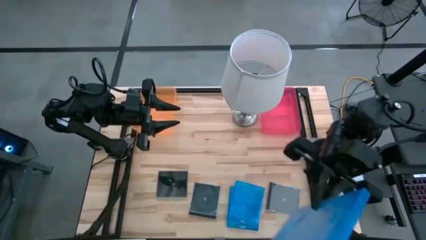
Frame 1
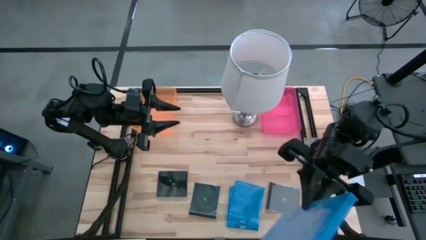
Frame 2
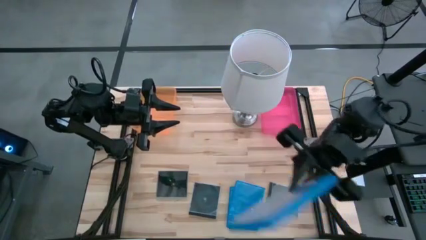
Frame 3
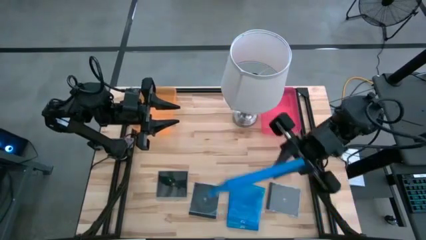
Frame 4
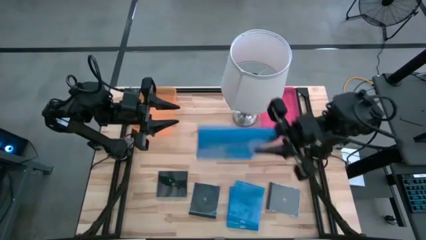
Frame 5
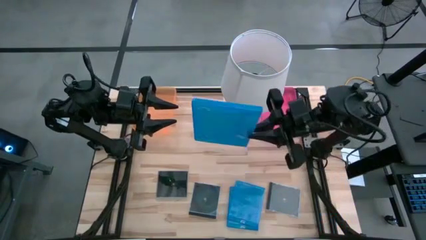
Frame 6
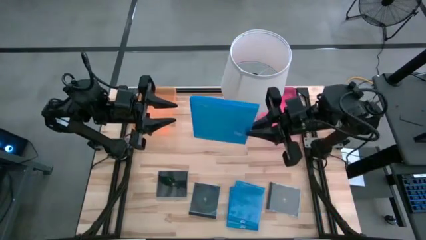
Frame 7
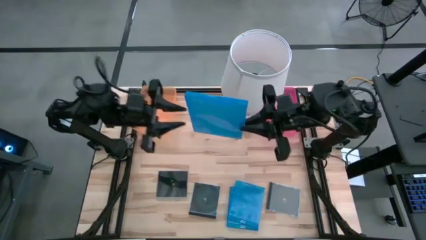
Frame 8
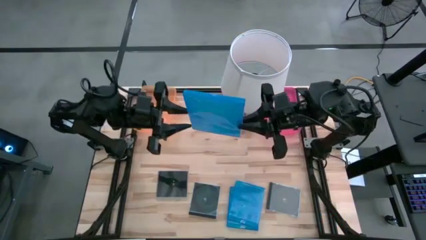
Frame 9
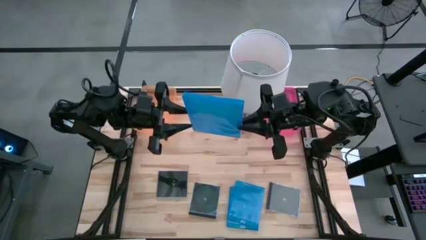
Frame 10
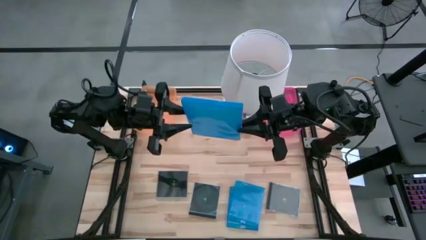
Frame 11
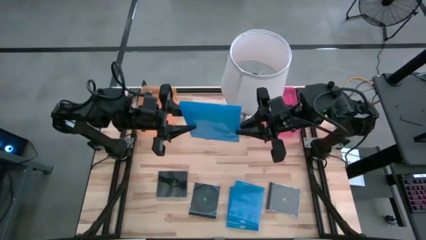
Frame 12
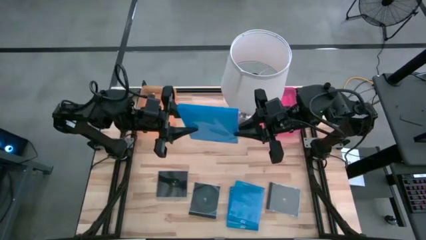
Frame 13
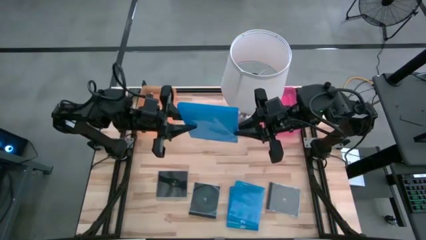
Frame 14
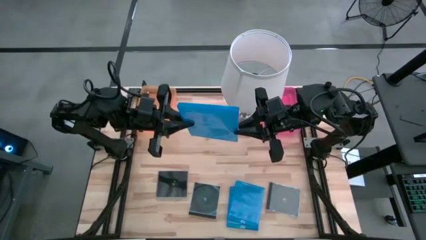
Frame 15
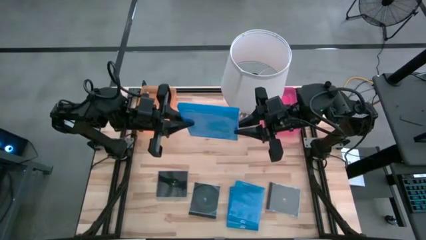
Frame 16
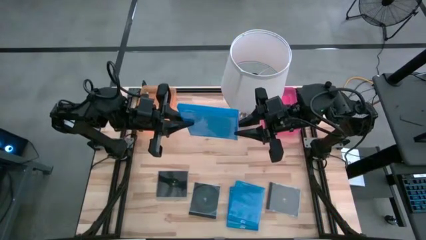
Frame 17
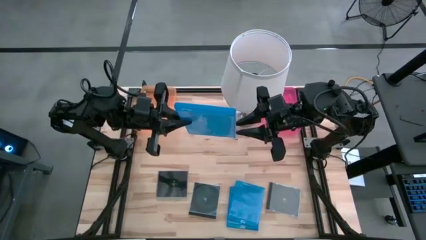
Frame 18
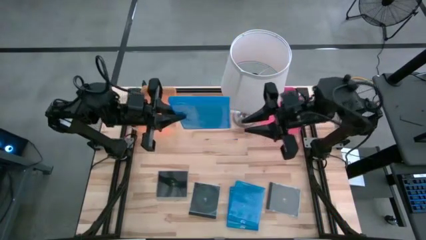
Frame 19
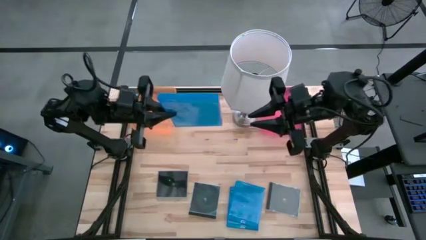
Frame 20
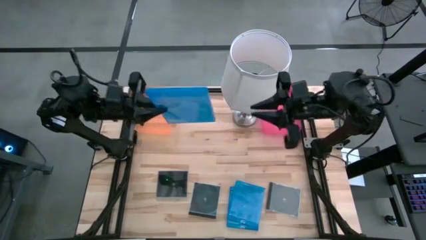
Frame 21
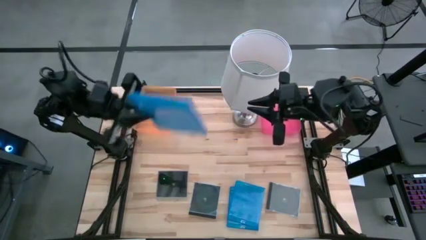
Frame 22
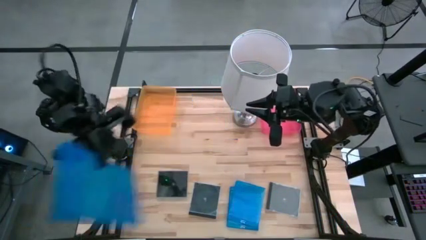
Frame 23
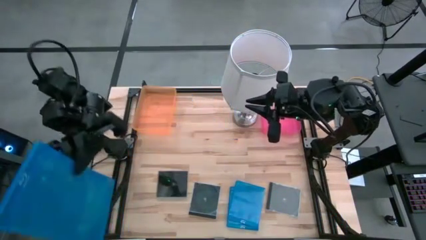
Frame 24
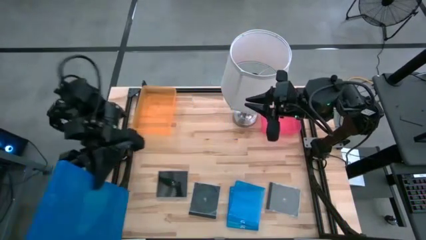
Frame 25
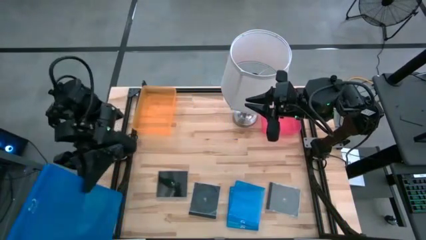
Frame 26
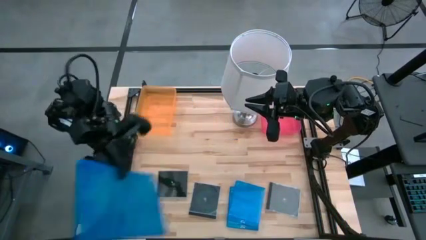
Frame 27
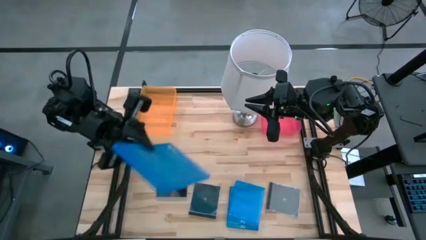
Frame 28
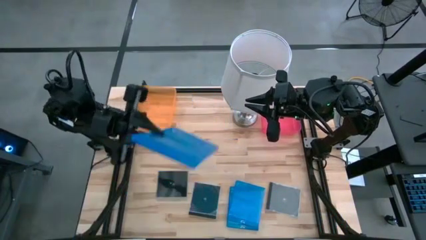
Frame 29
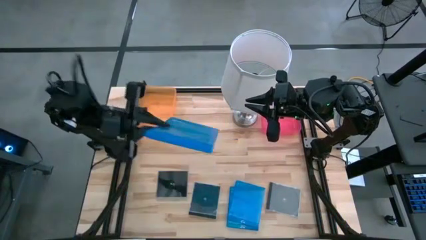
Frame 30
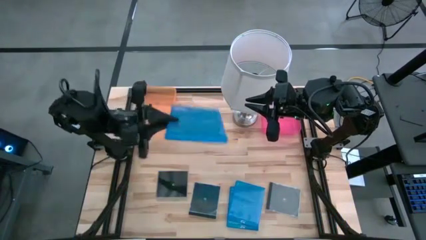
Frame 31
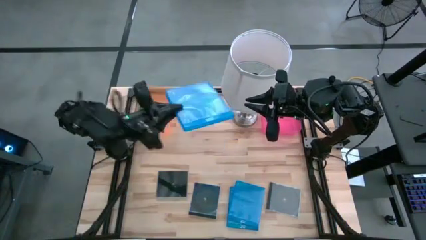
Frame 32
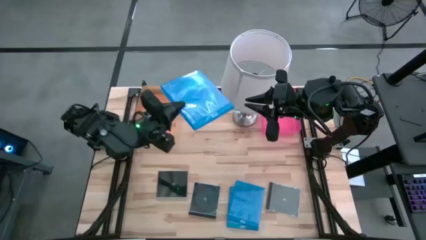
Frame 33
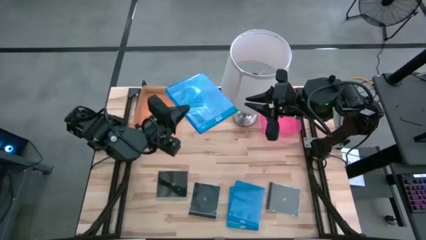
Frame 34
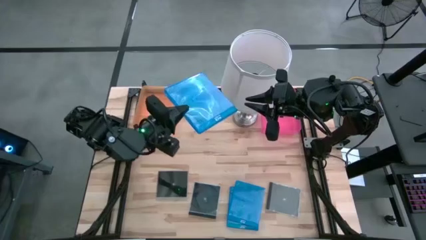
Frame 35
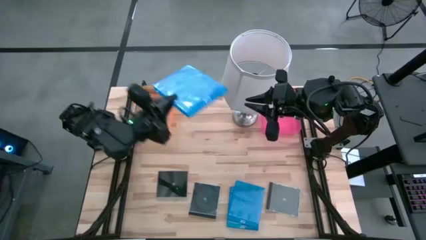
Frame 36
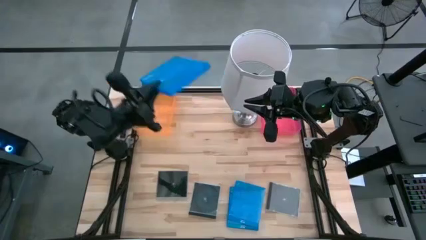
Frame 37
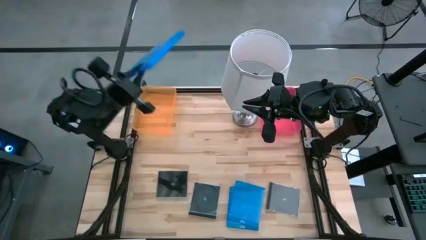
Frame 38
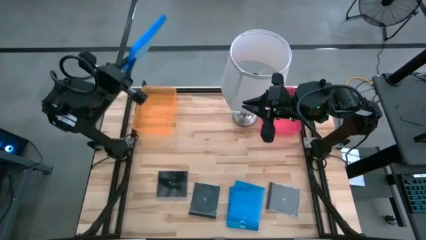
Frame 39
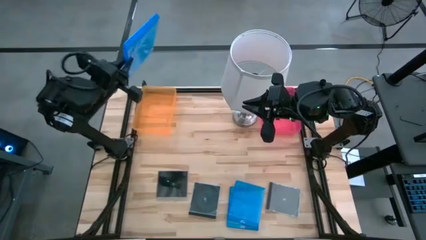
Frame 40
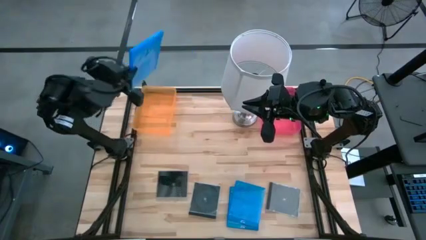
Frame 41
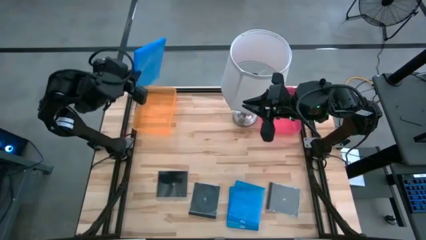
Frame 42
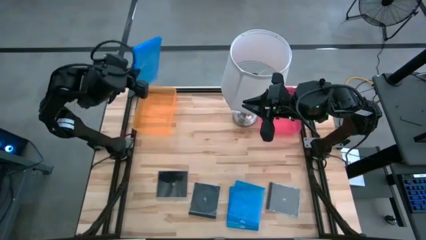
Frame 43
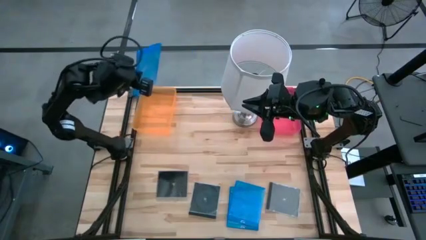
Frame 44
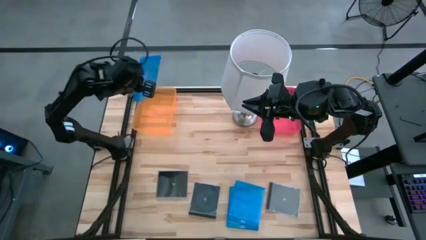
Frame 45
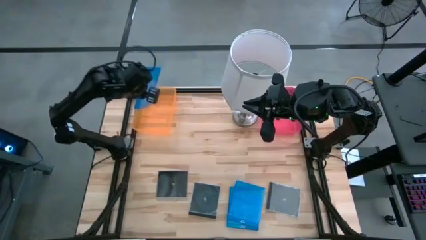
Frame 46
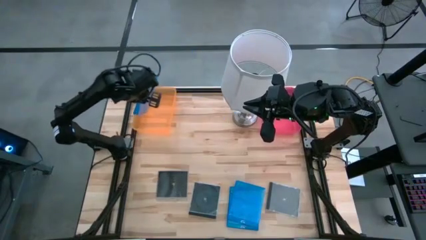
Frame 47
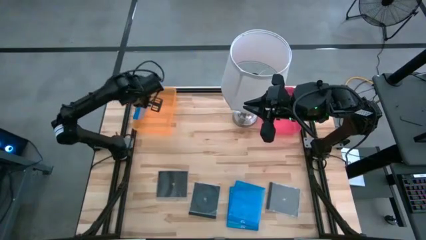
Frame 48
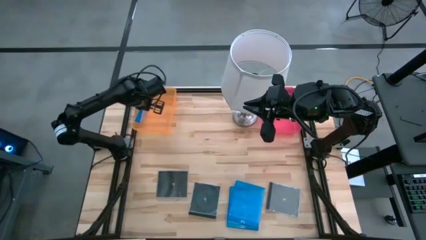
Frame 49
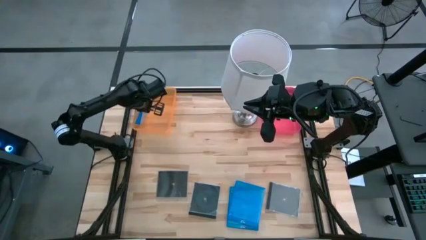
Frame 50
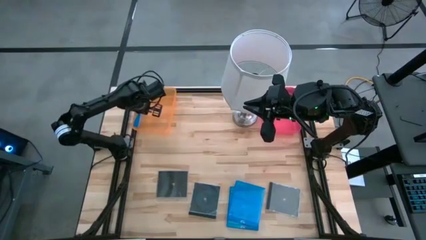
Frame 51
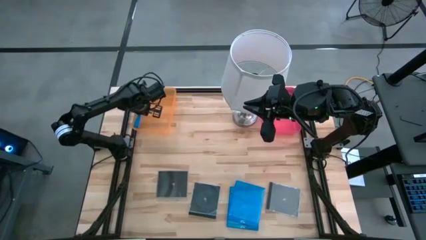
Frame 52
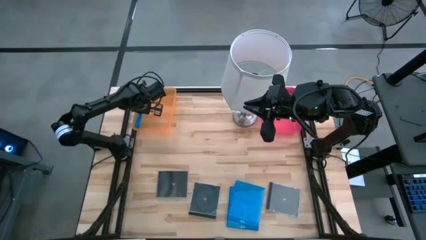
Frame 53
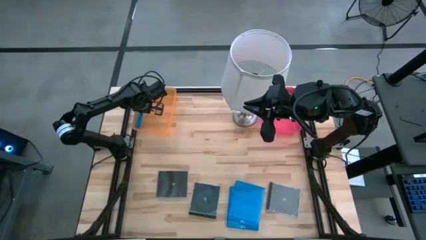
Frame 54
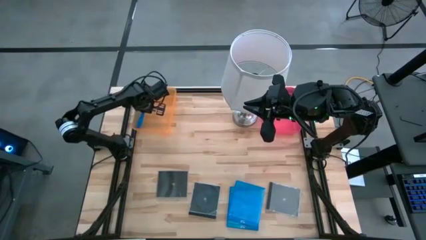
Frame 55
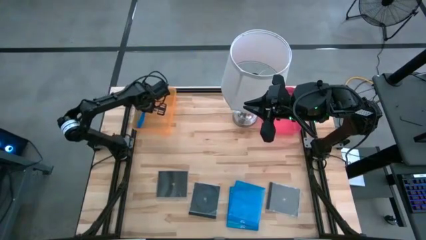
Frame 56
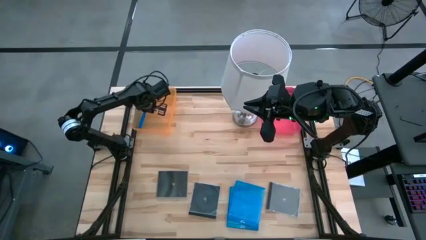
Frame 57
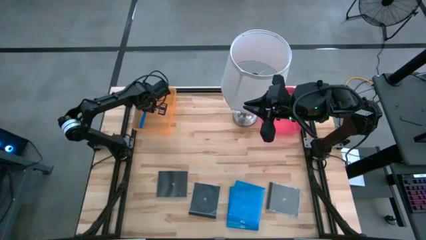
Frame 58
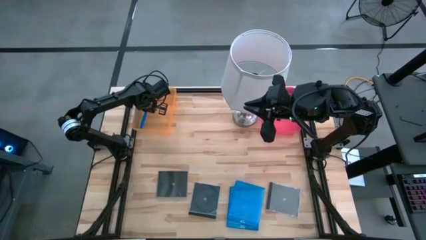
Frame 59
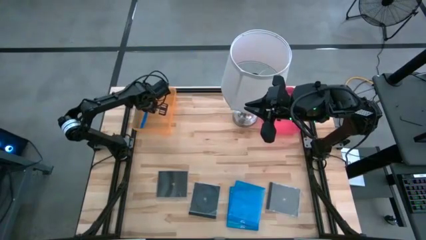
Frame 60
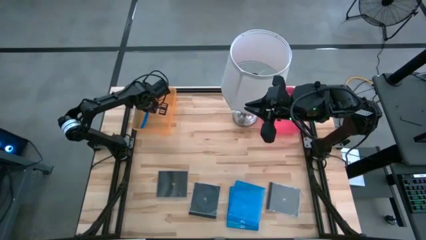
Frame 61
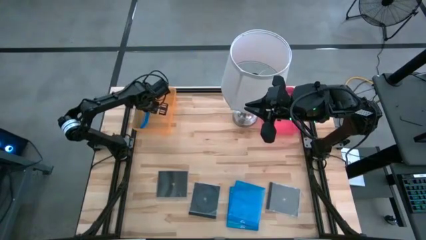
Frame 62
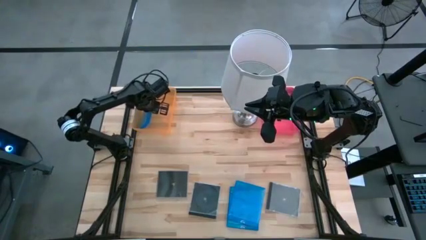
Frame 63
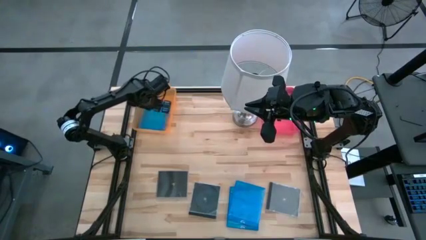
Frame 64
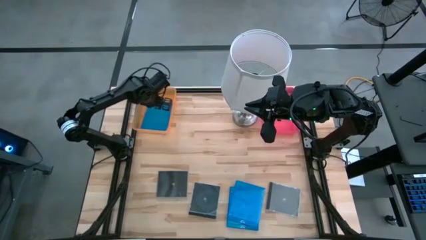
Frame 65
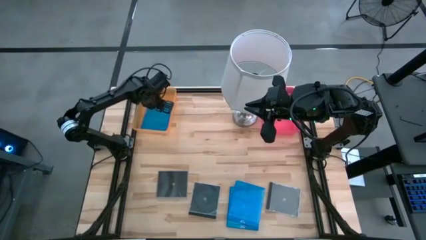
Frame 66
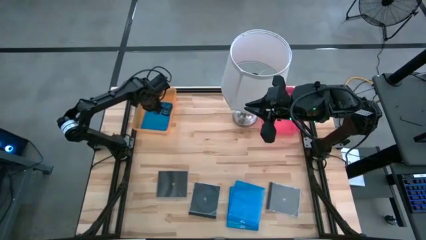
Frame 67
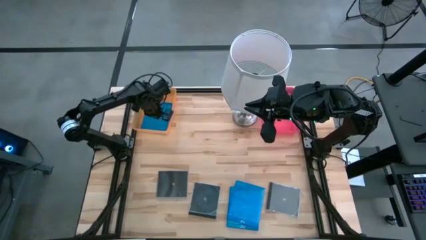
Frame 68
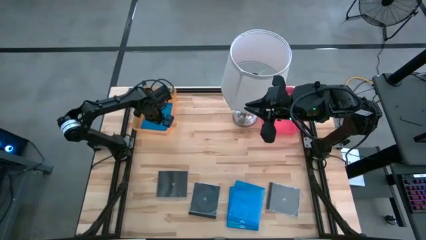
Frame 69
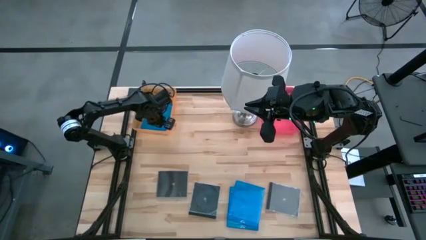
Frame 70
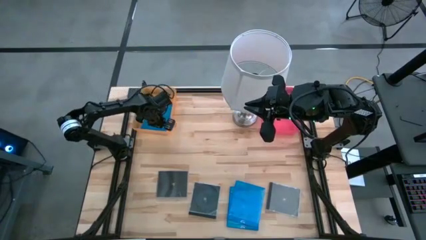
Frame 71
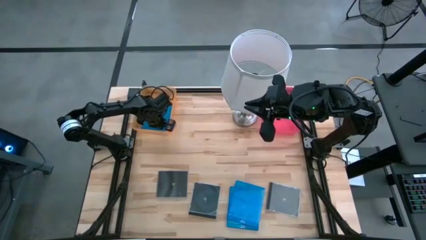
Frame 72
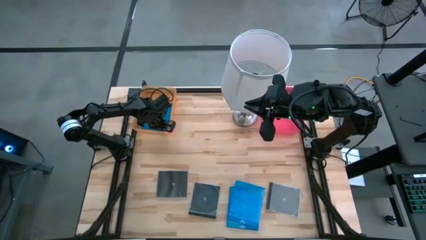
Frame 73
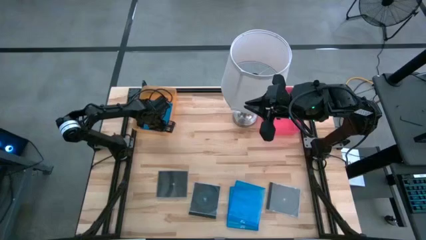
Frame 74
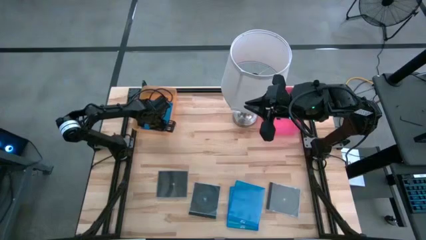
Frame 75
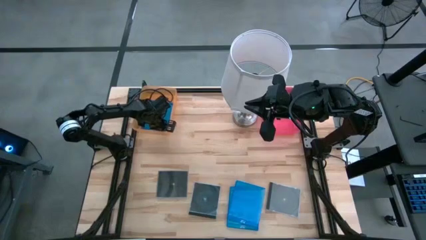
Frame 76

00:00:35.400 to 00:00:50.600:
Task: Pick & place jewel cases by type
Put the blue cd case into the orange bin
